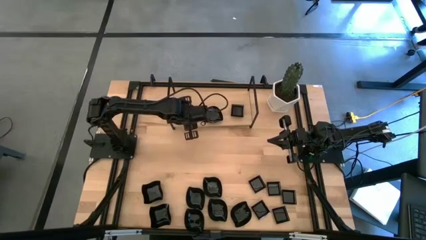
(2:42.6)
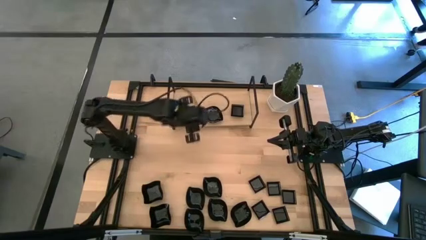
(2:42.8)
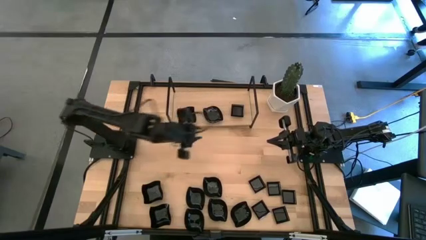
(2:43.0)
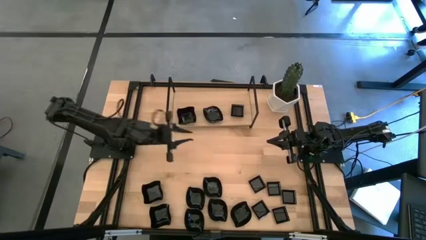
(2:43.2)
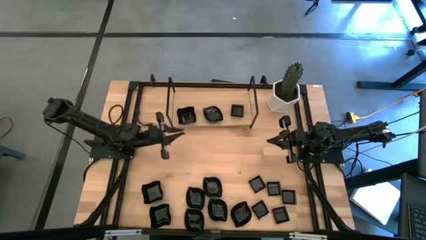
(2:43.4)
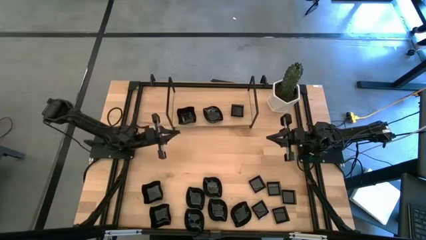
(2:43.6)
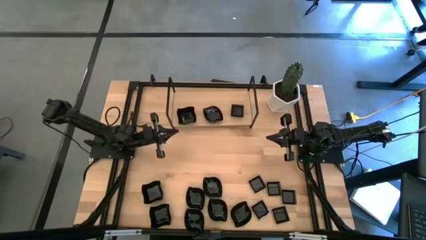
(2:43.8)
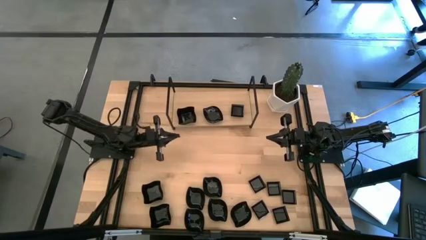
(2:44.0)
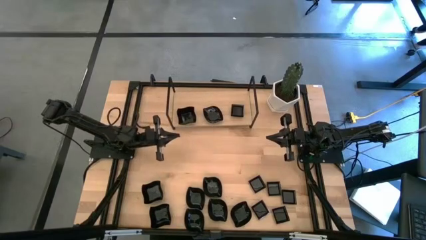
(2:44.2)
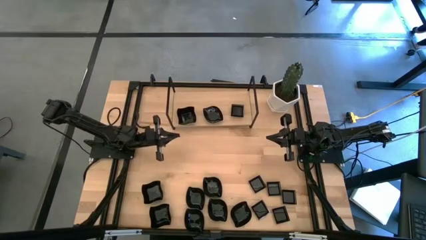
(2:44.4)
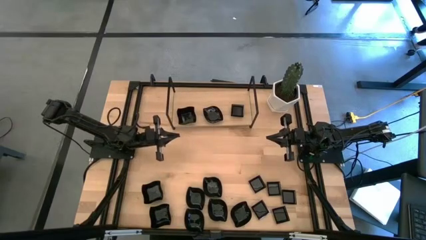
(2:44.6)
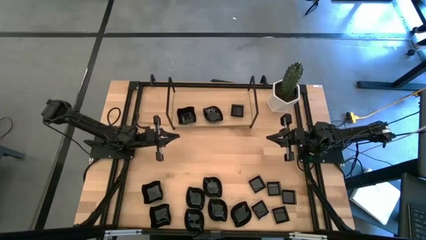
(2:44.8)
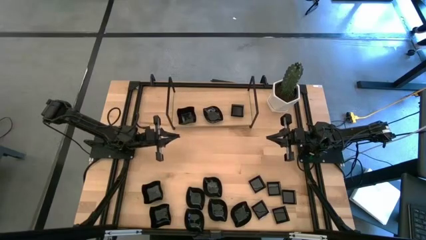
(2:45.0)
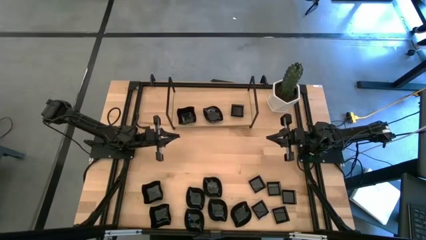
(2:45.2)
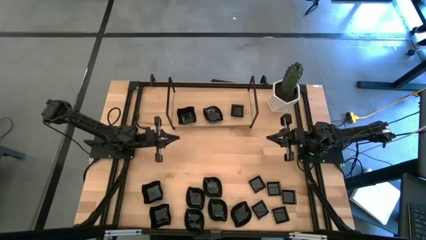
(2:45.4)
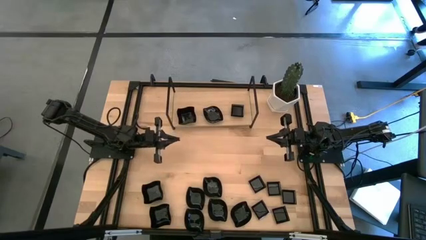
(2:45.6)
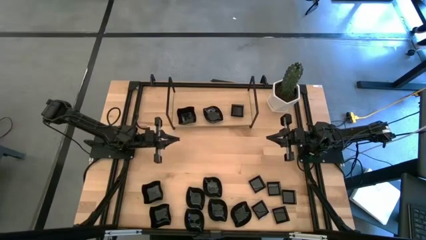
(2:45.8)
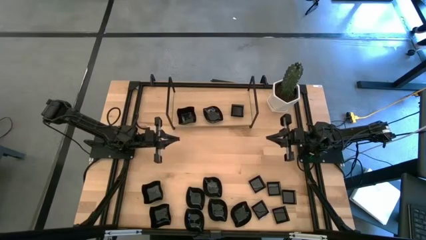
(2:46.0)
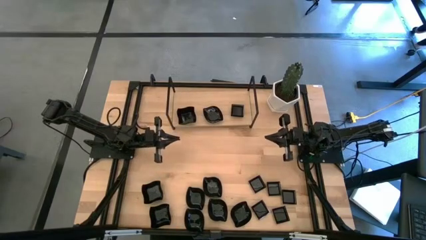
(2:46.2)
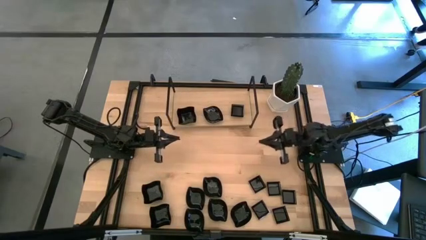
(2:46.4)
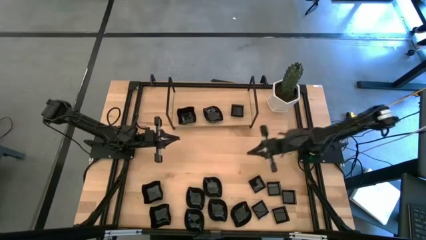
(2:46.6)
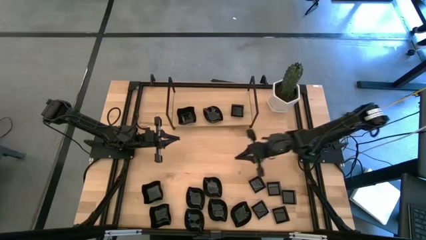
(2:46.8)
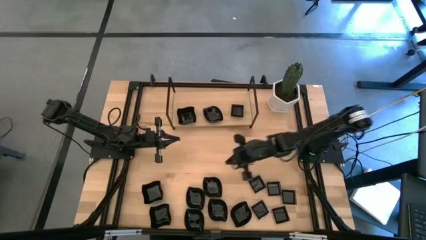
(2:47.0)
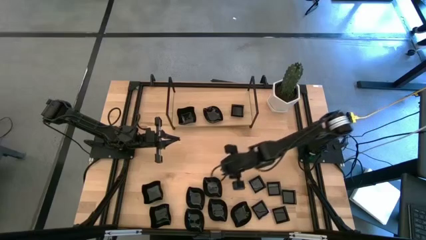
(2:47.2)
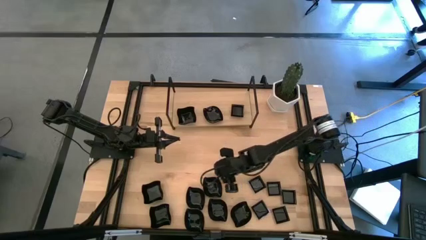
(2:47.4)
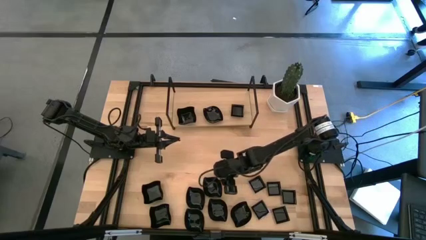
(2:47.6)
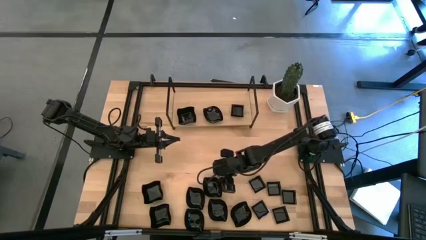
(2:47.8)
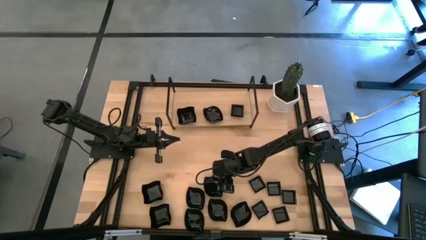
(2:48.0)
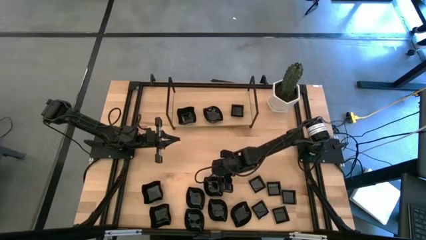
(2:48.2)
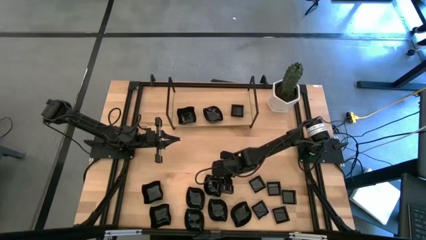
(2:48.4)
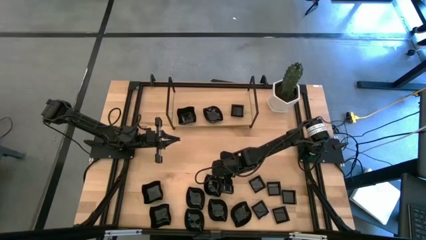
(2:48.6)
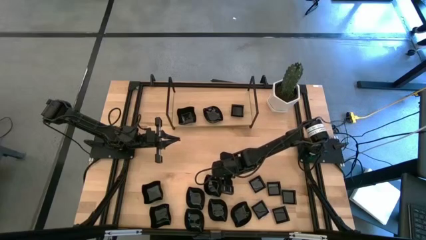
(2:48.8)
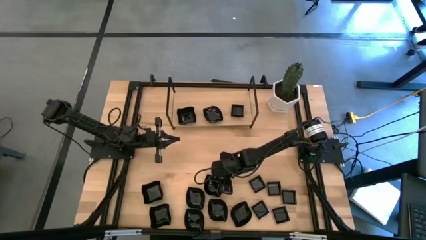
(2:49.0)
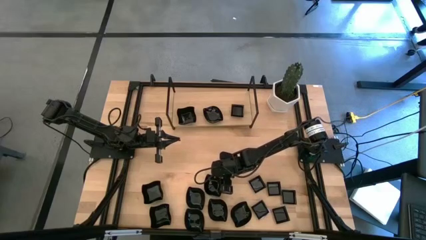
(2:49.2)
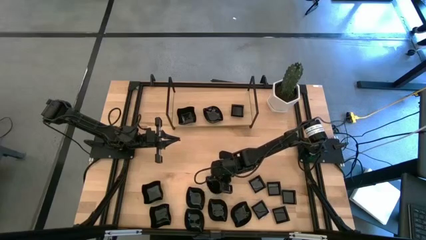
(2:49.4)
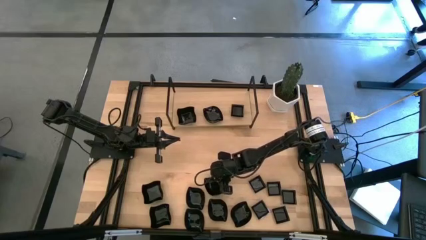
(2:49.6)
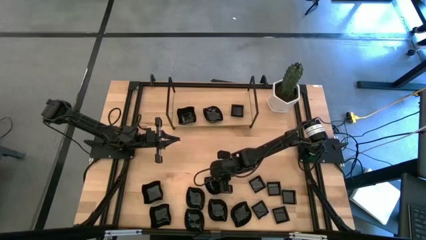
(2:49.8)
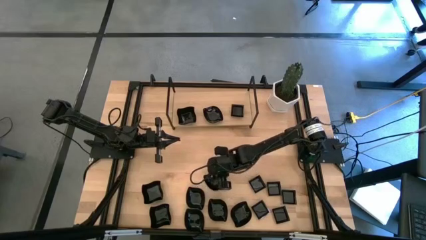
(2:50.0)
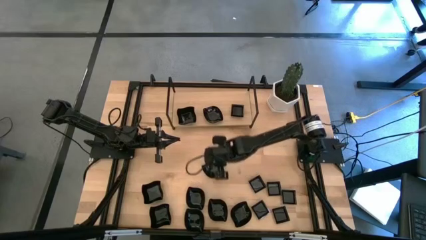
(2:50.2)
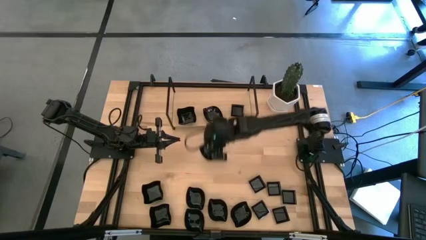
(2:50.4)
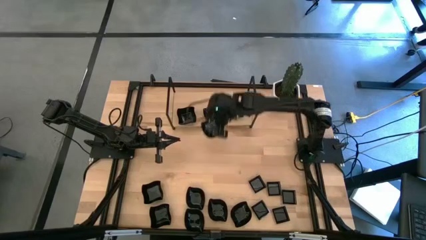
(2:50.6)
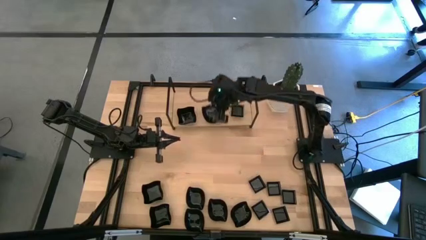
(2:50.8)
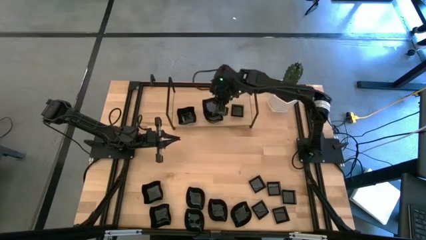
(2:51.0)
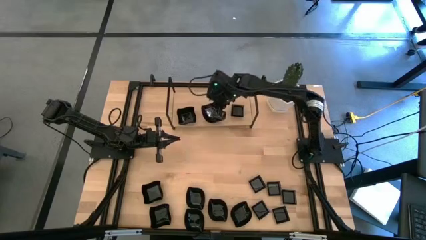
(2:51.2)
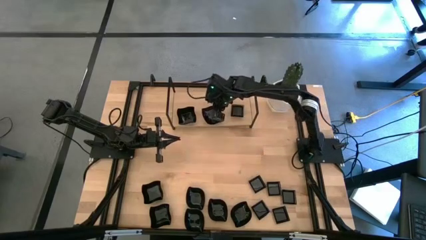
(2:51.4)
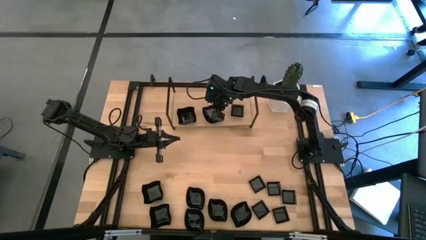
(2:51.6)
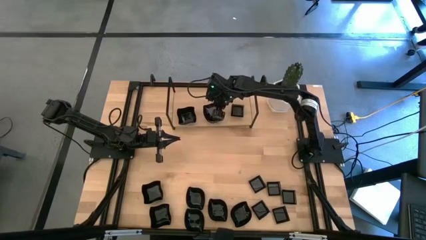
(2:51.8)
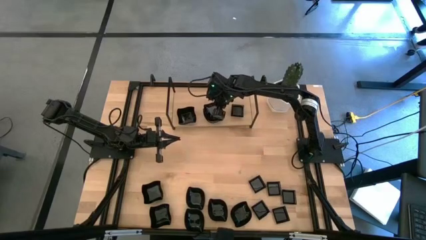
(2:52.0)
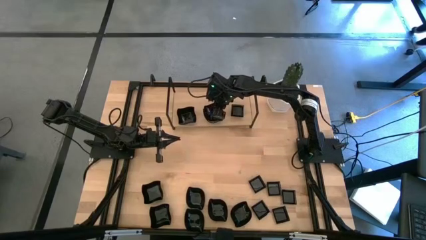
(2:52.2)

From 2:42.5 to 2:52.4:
Task: Pick & Place Mini shaped plates
Stack the black leaf-shaped plate on top of the black leaf-shaped plate on the shelf

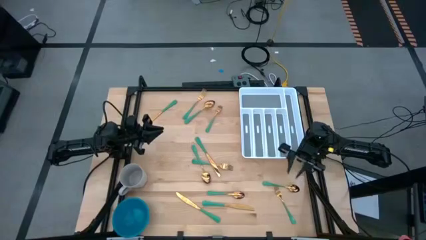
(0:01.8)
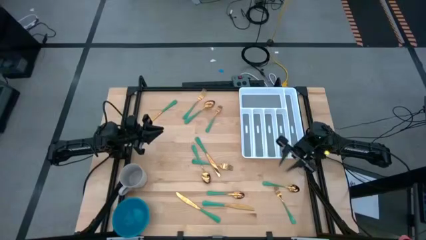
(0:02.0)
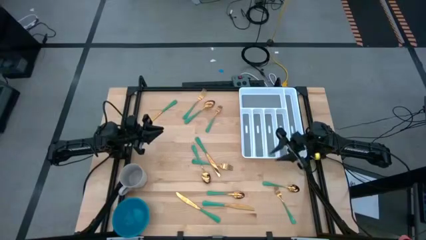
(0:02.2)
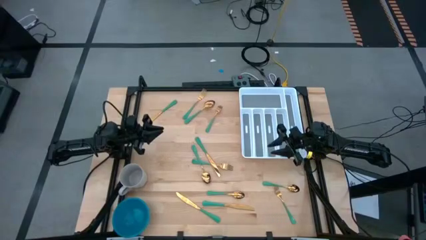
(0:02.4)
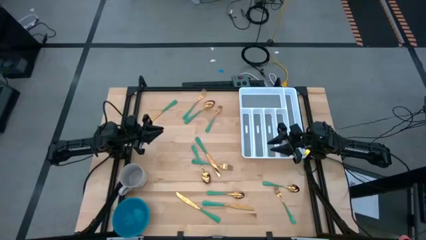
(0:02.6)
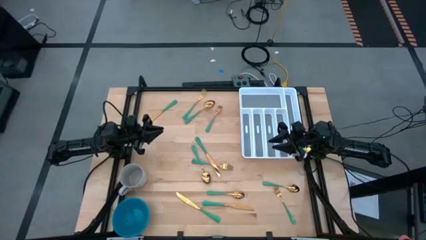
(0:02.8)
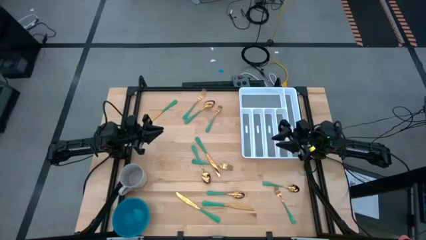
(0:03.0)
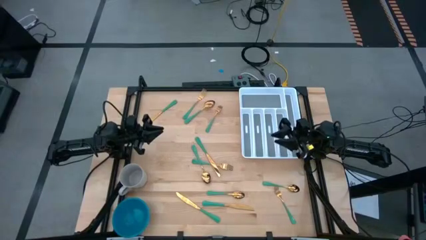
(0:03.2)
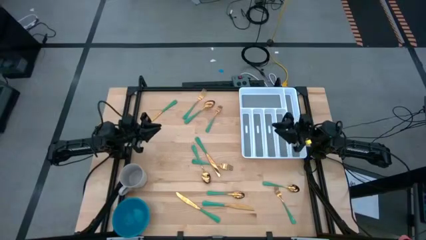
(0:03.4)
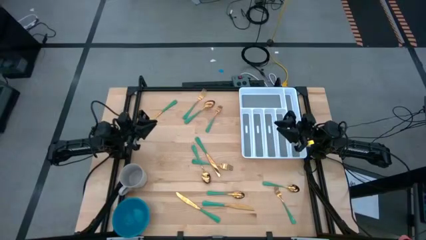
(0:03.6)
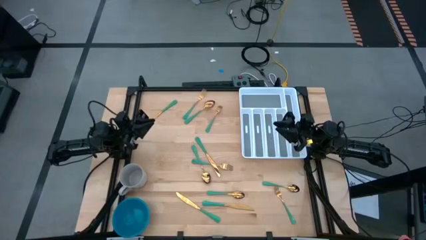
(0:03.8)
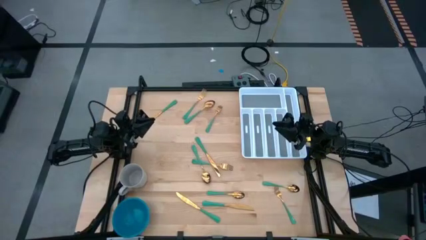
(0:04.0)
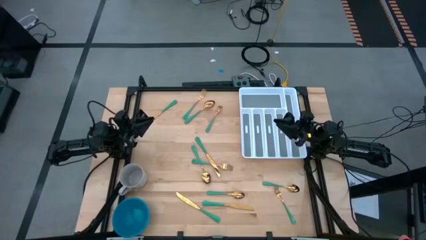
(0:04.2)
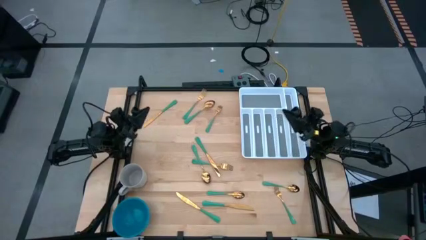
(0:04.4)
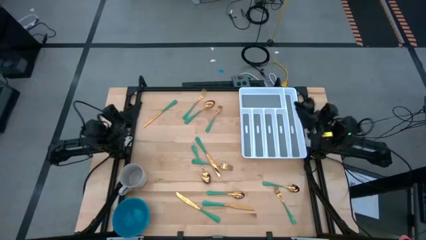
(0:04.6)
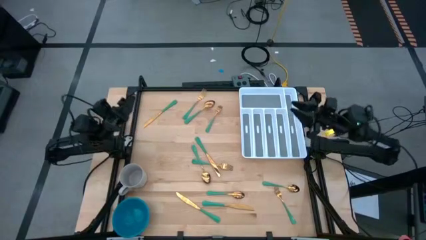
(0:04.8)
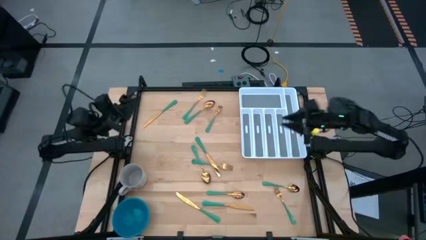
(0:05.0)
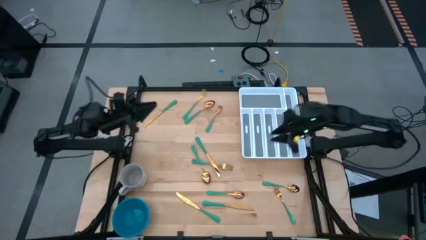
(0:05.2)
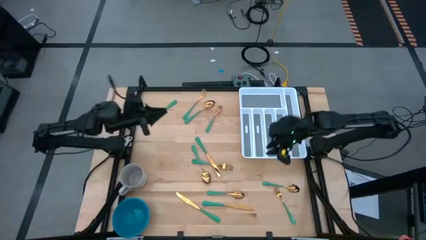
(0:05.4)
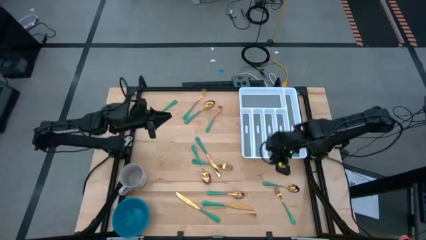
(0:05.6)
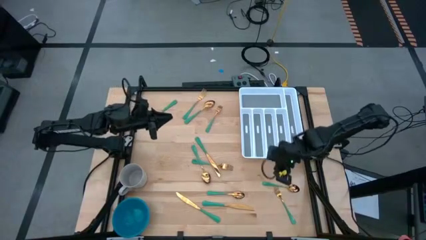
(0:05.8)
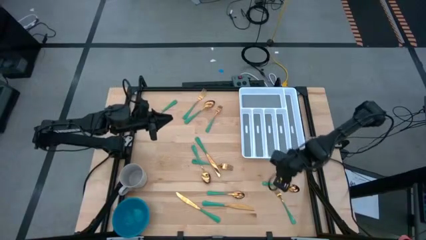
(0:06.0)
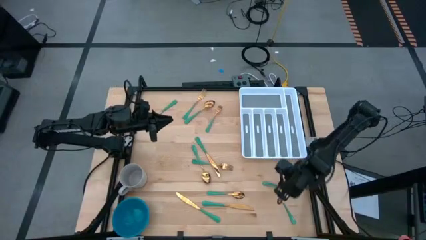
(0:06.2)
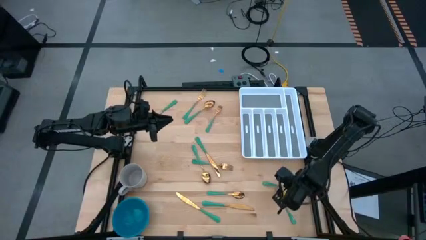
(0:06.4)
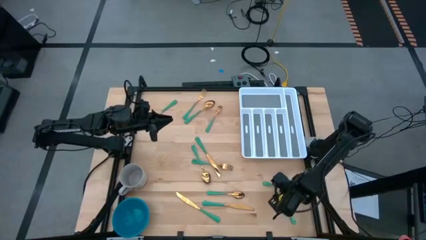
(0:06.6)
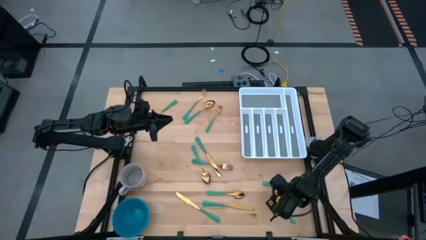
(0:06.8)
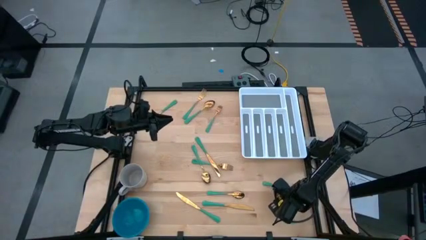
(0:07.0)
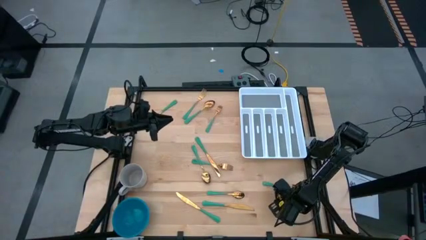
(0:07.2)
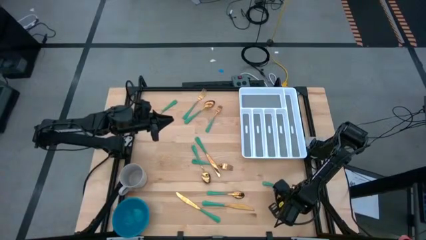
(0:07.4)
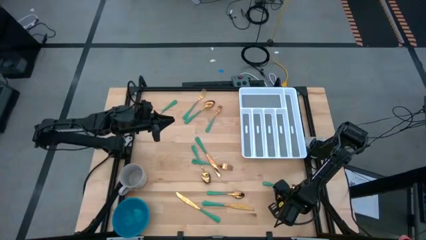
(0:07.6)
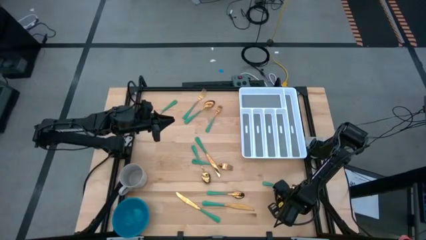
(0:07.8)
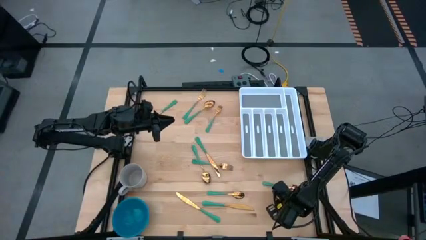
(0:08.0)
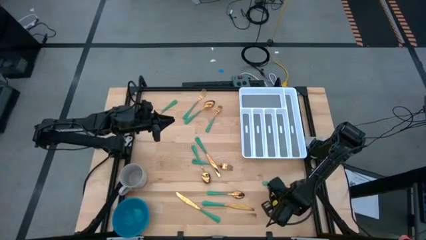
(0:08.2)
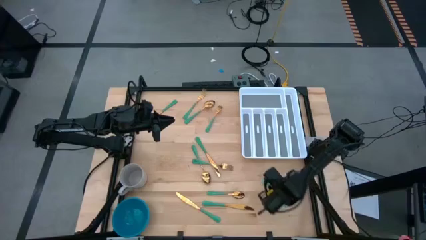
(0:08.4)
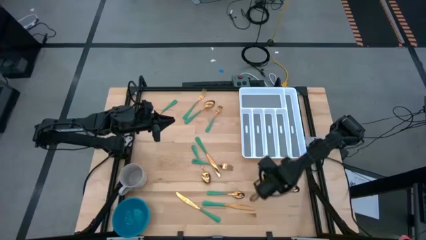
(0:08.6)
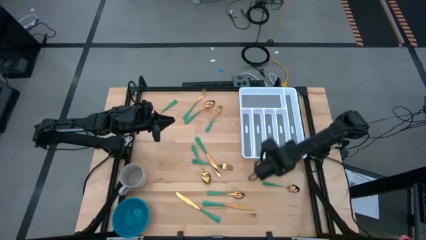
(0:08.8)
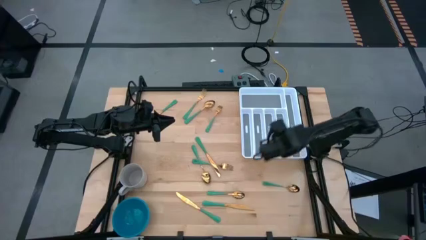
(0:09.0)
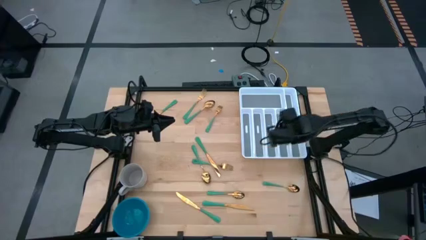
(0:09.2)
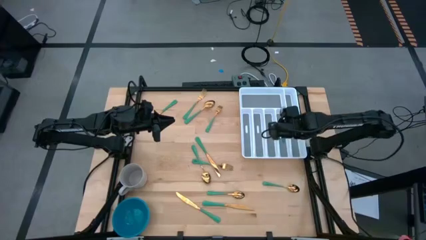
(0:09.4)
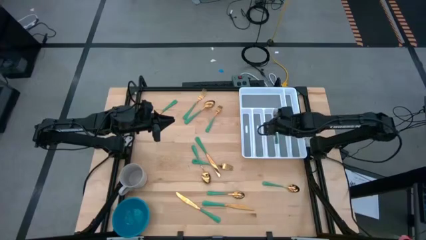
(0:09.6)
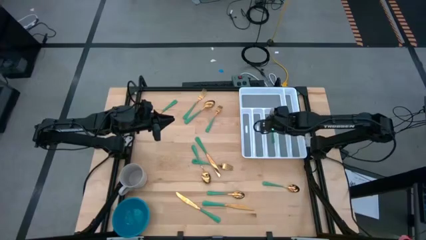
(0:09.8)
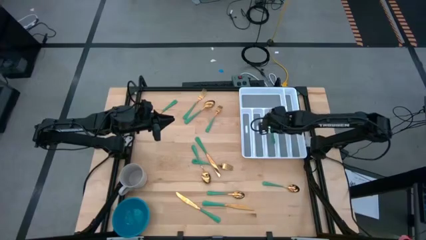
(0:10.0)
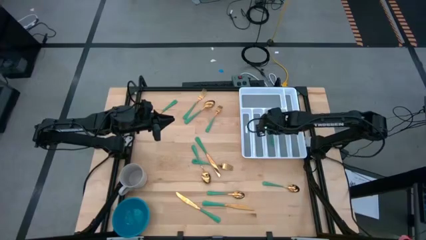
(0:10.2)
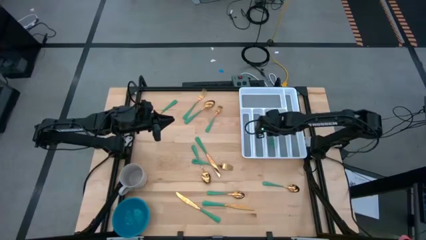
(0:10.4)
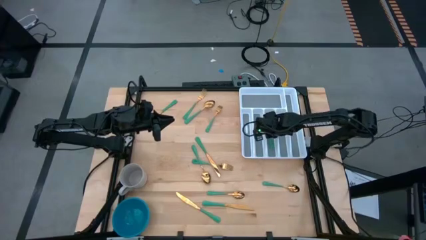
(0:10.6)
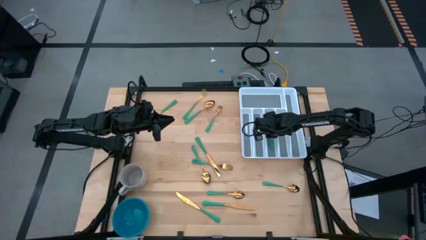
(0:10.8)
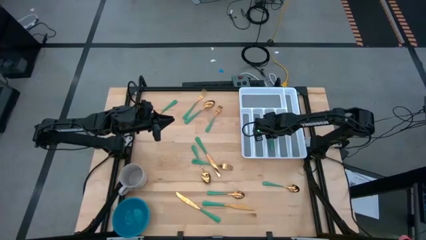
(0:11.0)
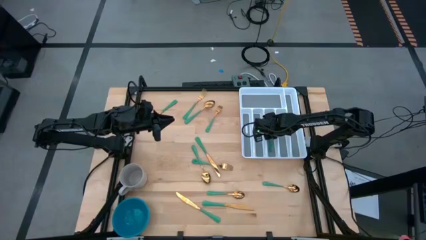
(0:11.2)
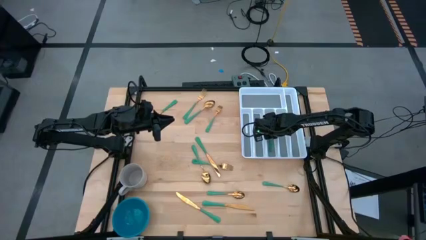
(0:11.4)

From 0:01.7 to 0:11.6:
Task: Sort silverware
Put the bottom green fork into the white cutlery tray
